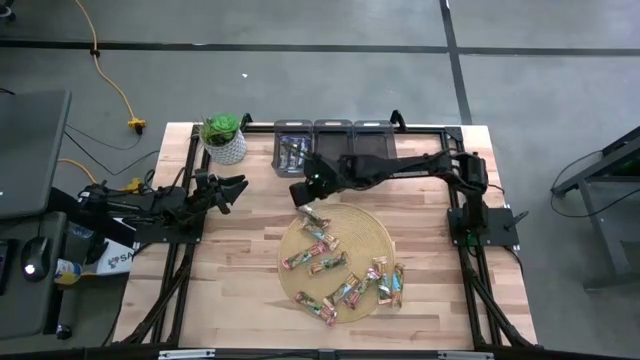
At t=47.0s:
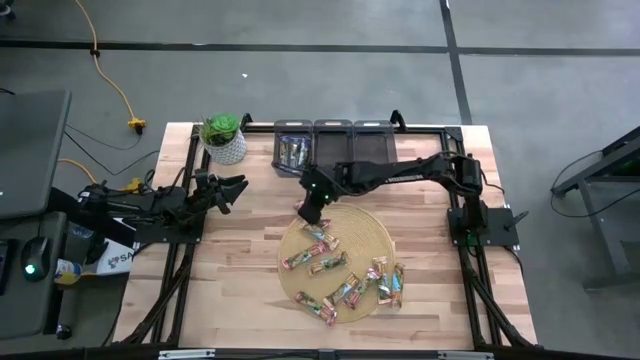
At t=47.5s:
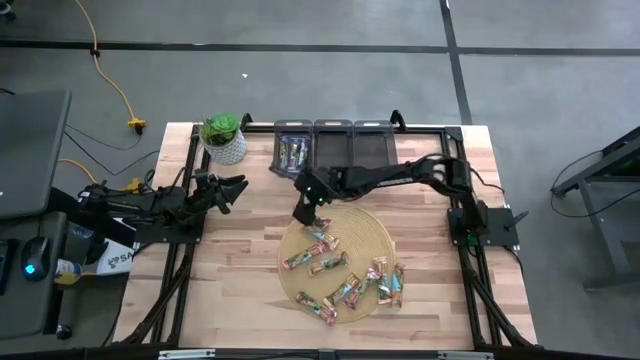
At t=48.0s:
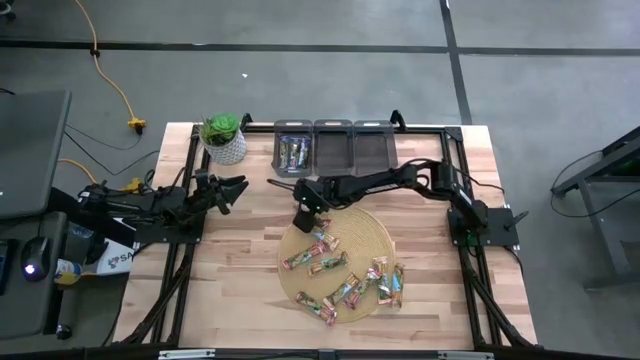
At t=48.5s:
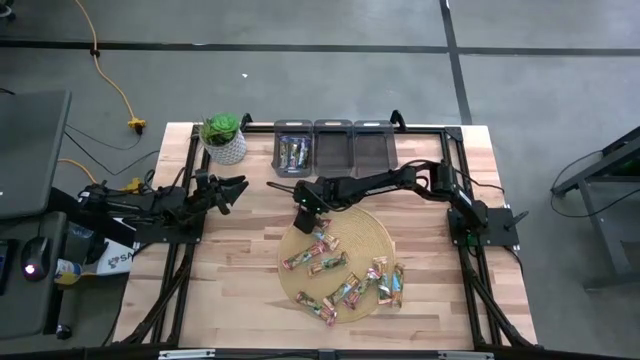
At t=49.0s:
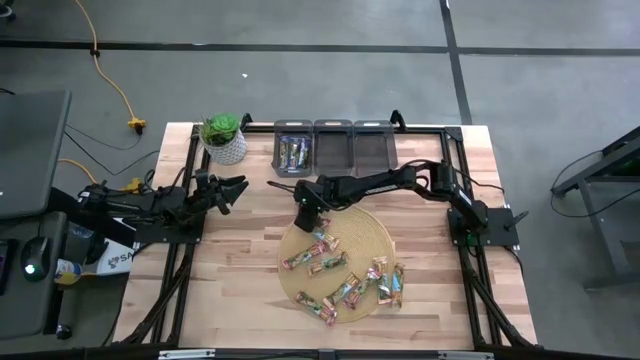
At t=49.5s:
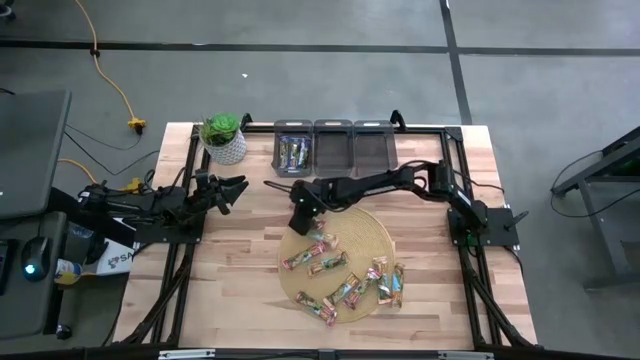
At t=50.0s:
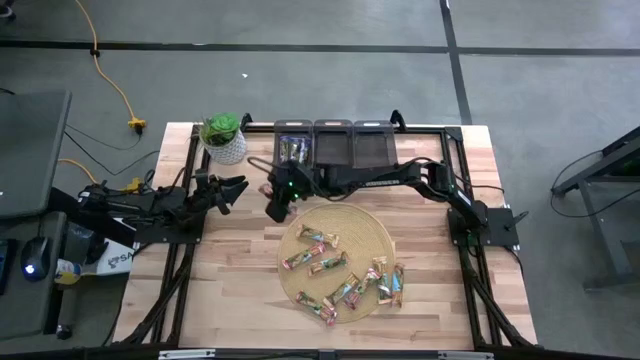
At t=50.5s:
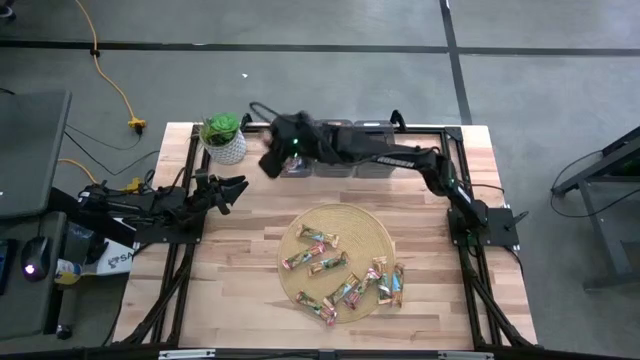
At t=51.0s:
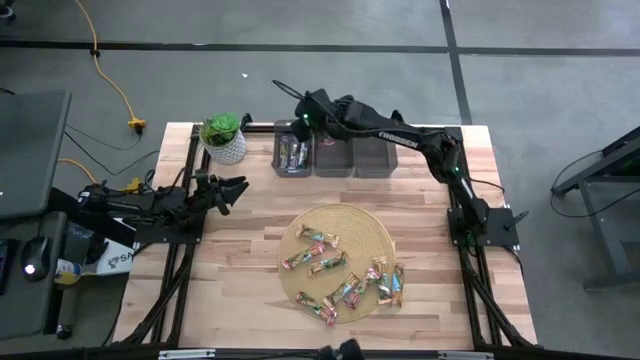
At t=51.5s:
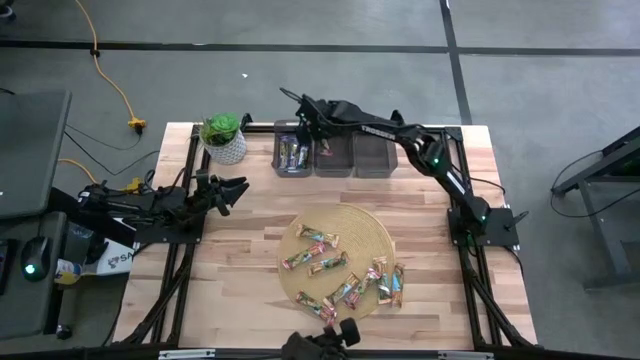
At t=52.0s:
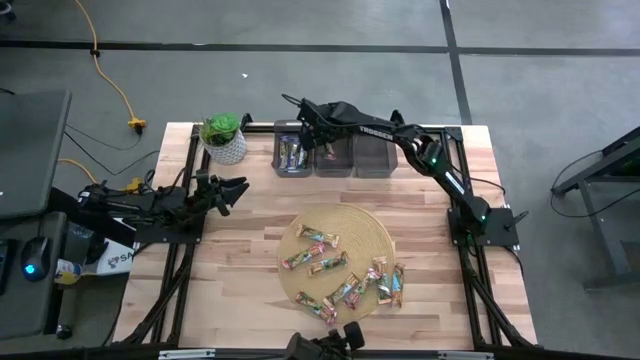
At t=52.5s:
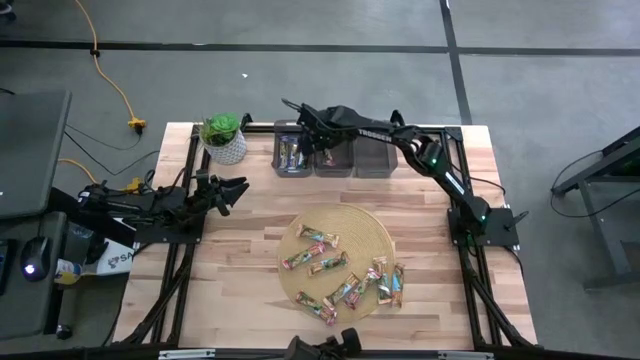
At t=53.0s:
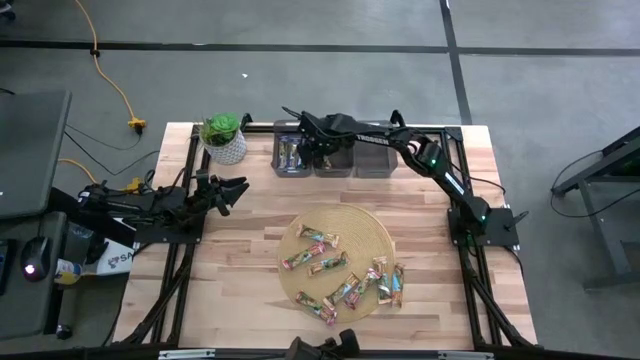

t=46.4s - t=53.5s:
Task: Pick and place Granola Bars by type
Put the red granola bar into the middle black bin

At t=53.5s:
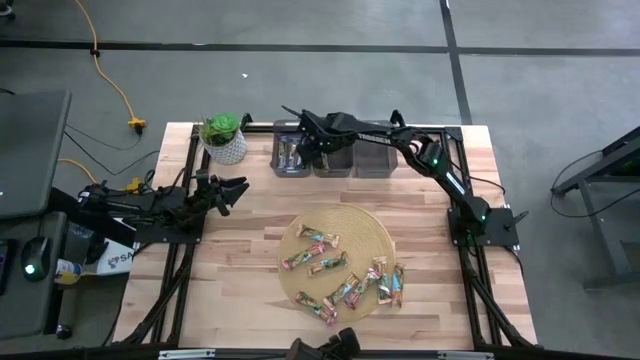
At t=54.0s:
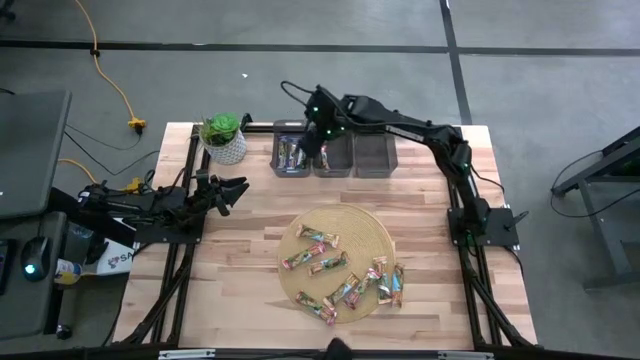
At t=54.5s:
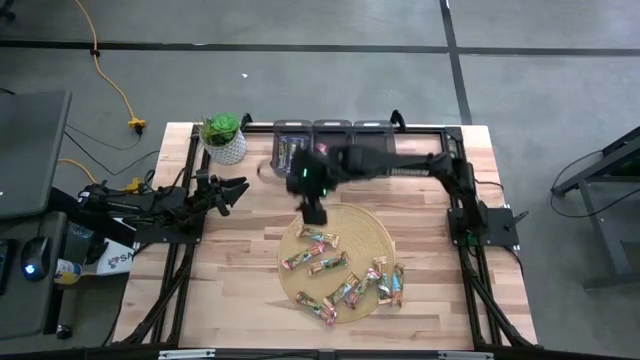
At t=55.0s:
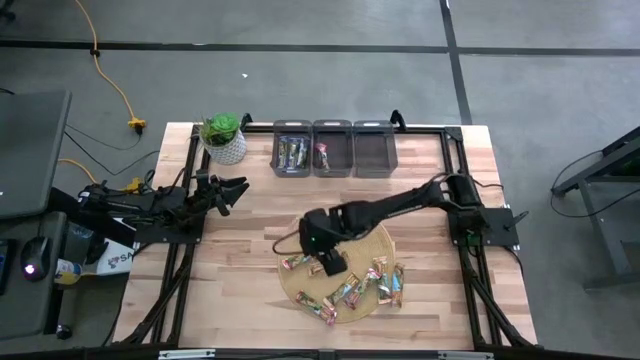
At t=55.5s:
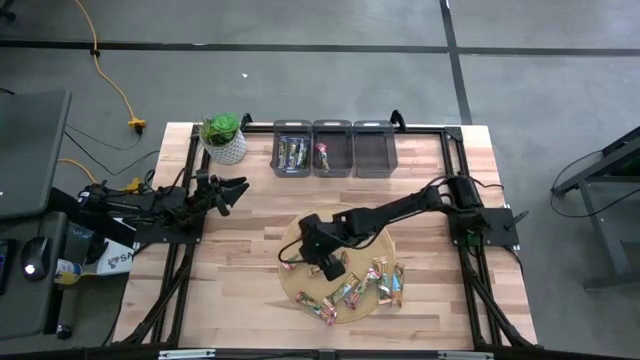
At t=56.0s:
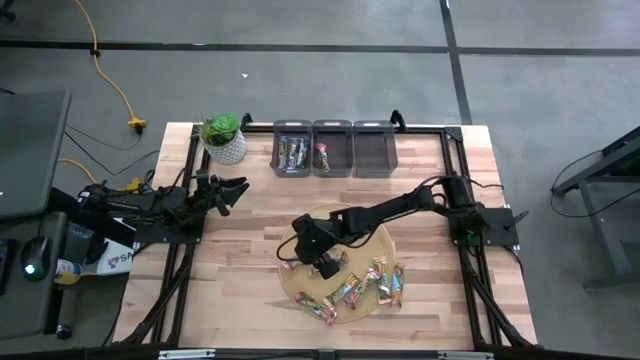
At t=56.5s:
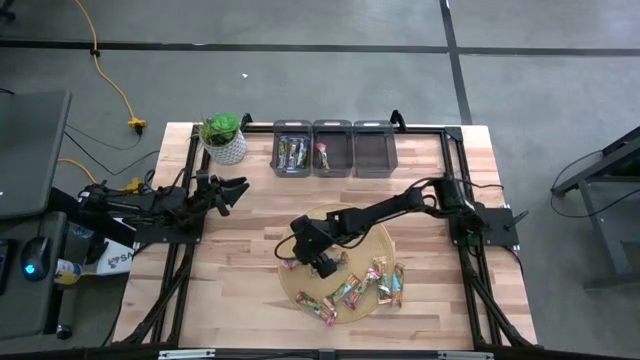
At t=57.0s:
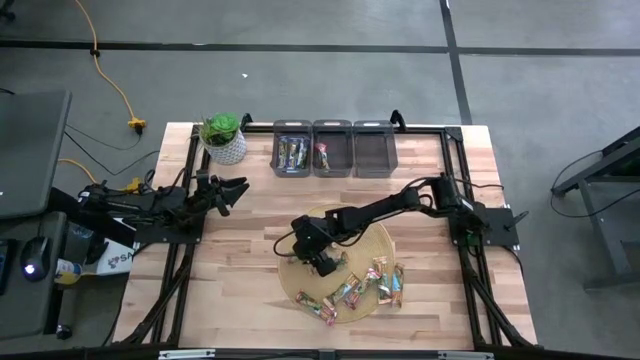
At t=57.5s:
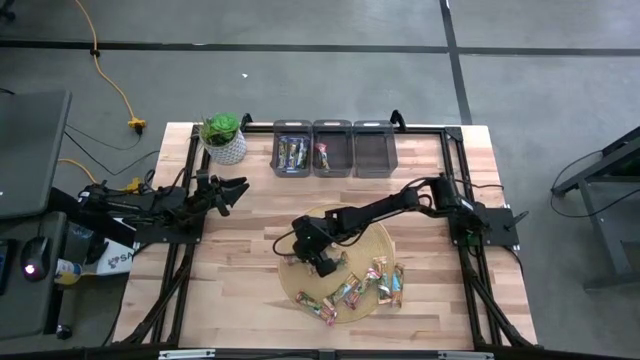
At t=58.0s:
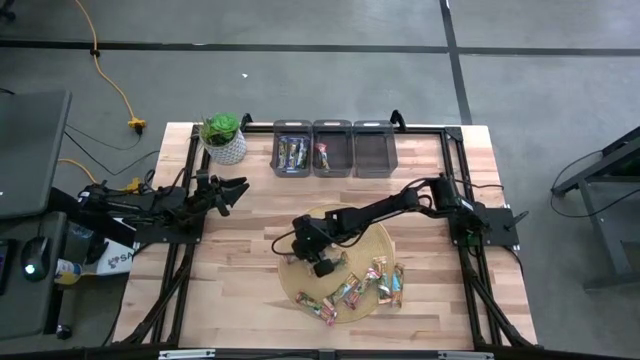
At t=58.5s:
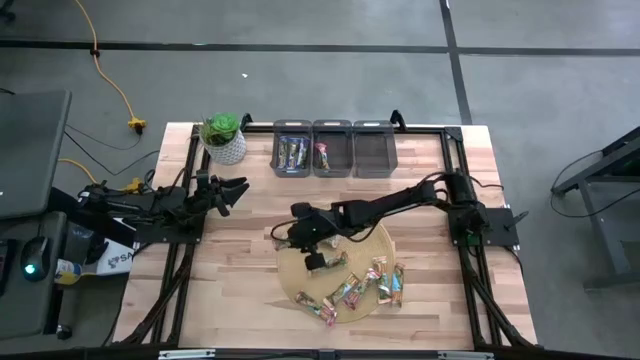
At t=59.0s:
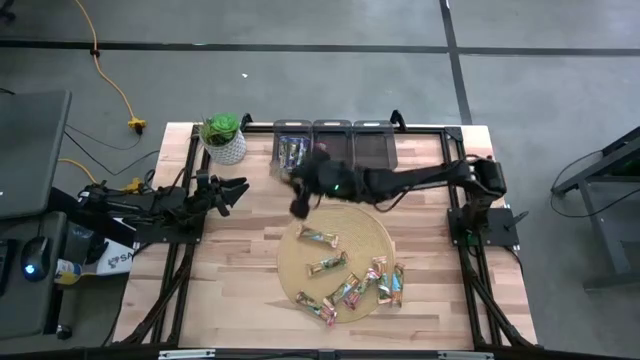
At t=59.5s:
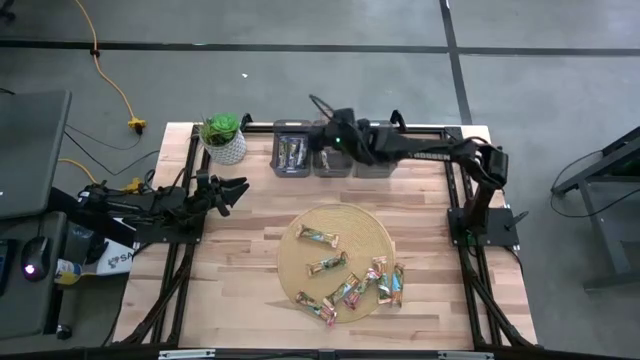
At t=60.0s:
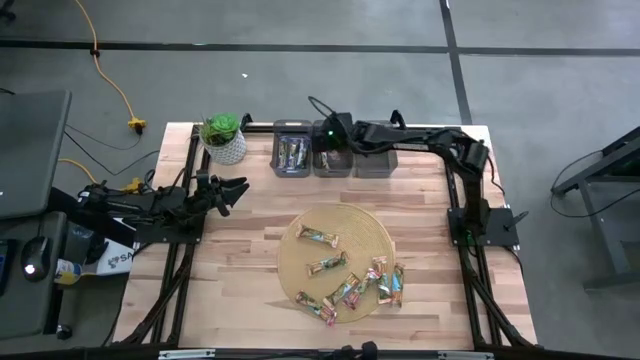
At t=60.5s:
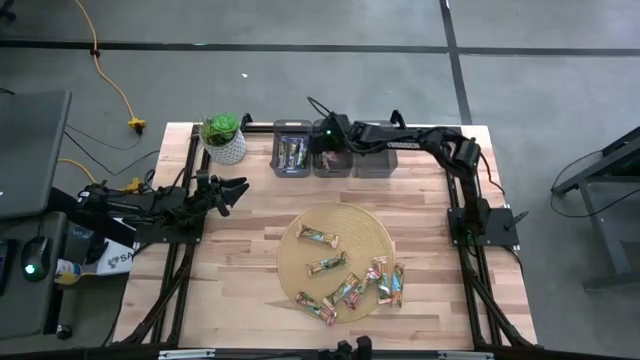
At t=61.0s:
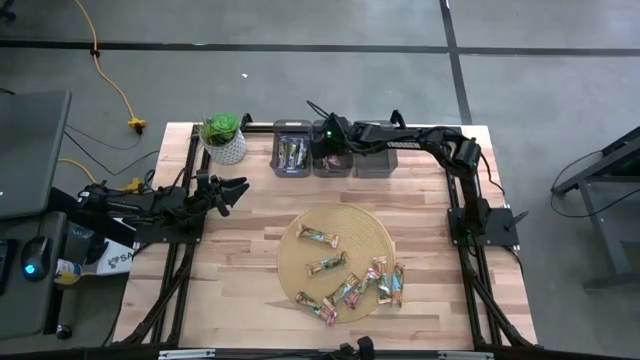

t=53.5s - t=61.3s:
Put the red granola bar into the middle black bin

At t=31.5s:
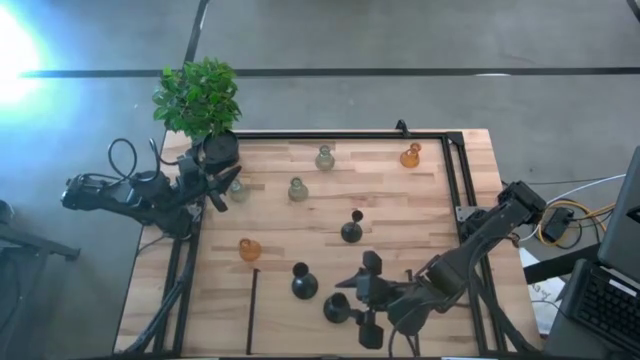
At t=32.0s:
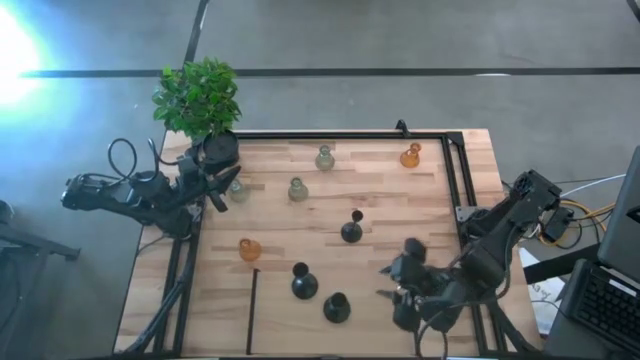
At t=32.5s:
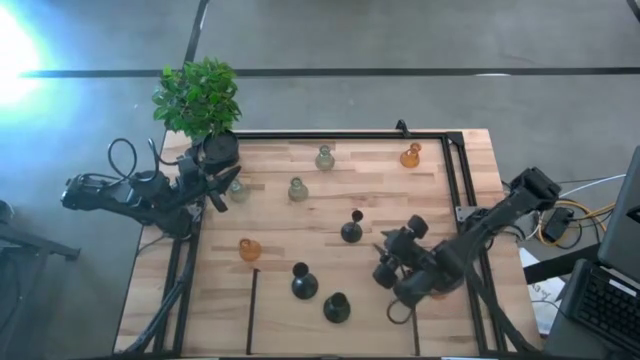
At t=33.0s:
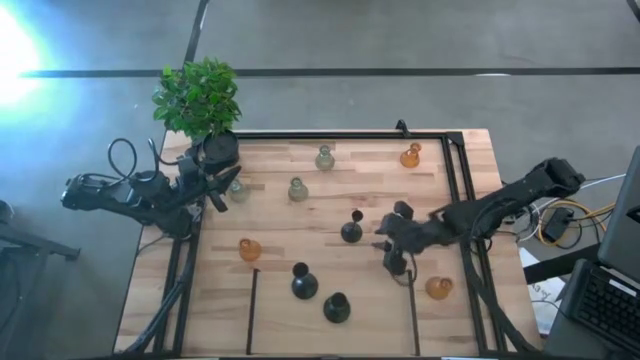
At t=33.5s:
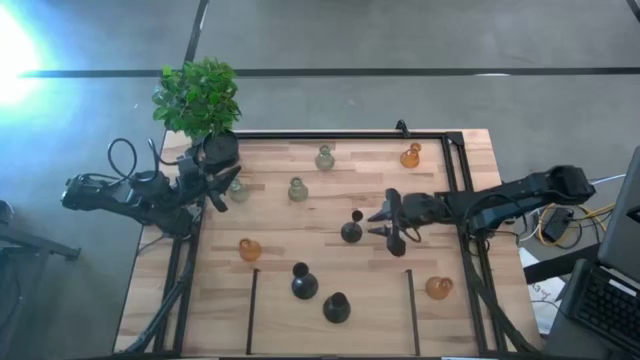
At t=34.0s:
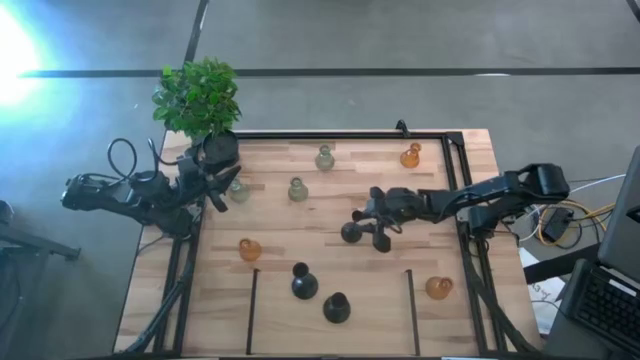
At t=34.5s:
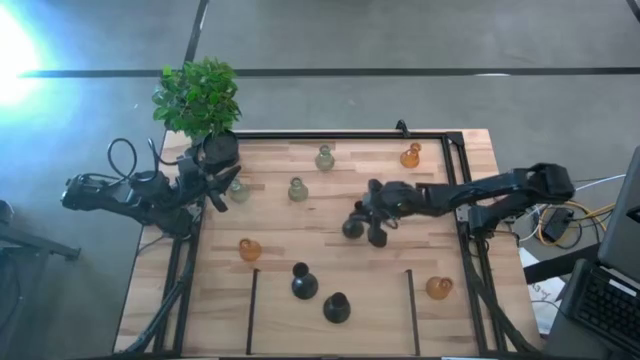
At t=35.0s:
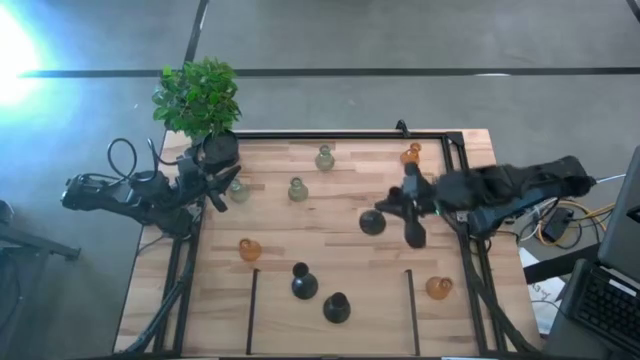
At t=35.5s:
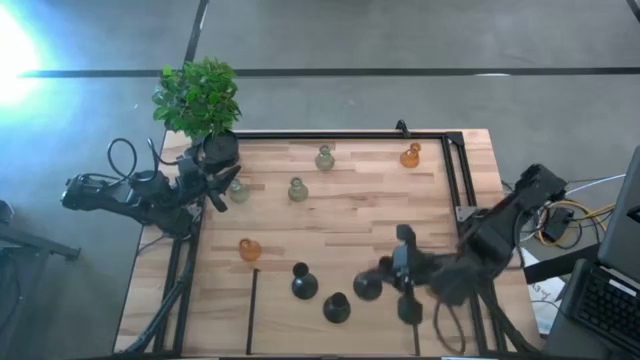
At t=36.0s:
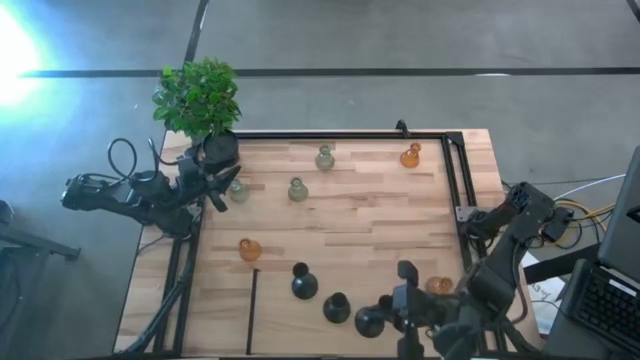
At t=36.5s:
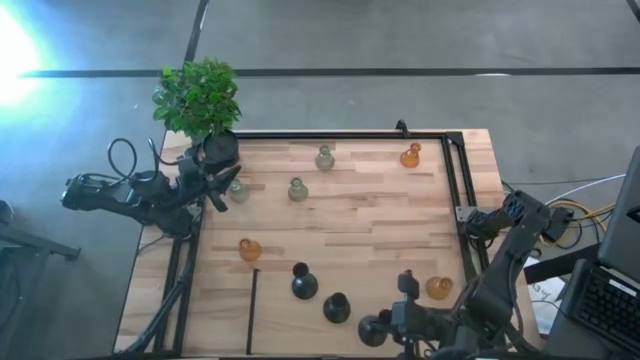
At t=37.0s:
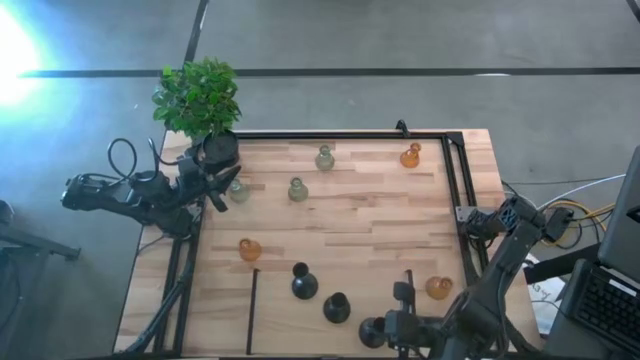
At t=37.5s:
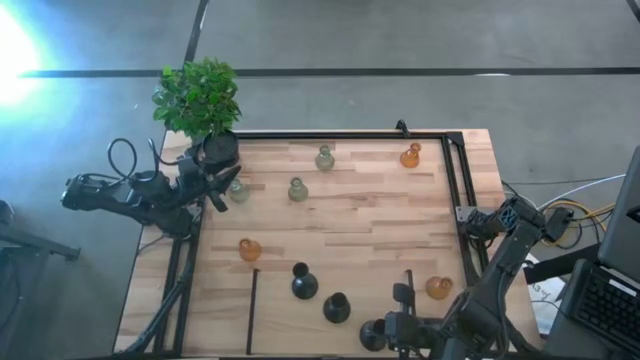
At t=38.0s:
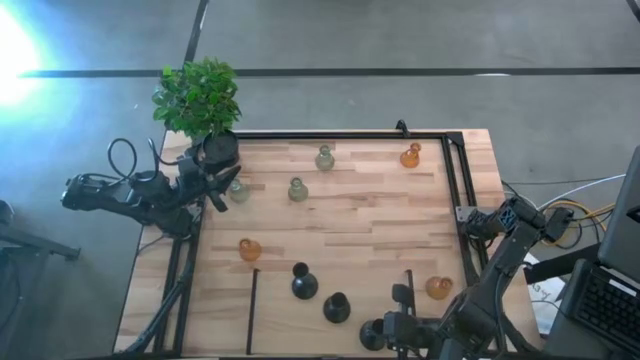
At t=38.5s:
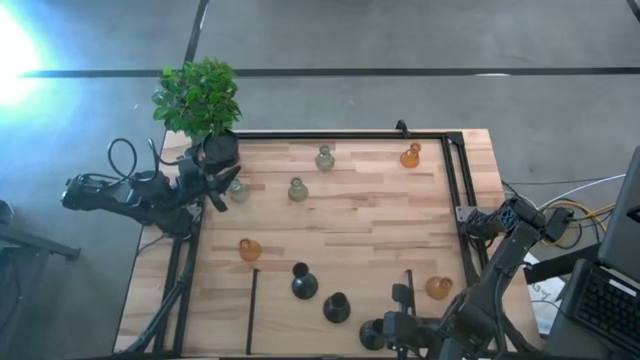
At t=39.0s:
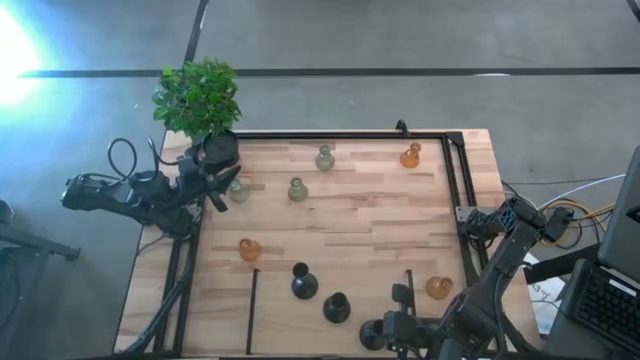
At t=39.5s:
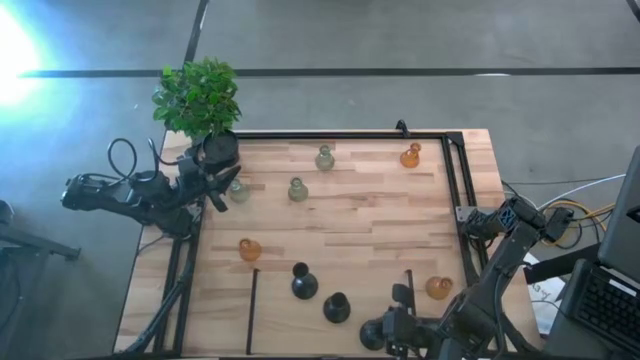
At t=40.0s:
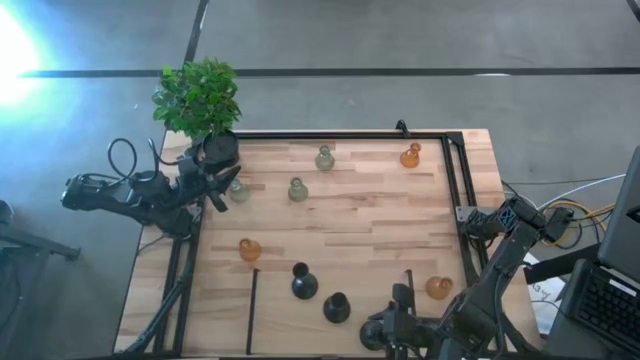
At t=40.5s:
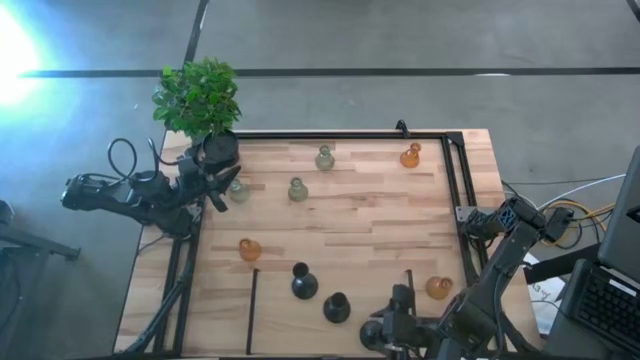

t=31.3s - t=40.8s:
Task: Pick & Place candle stick holders
Put the black stick candle holder on the shelf
